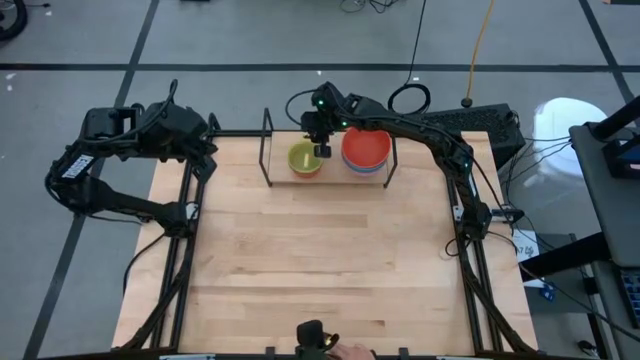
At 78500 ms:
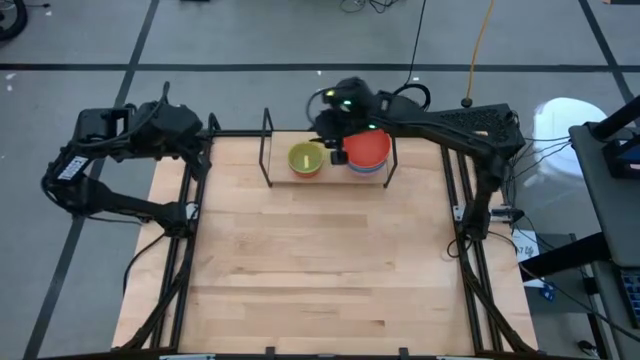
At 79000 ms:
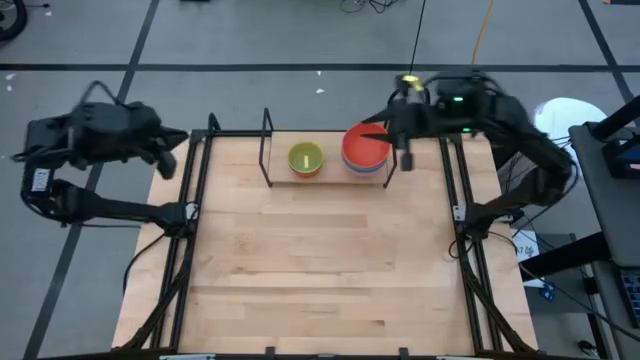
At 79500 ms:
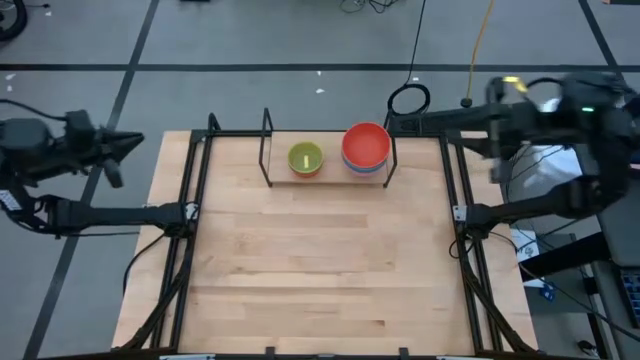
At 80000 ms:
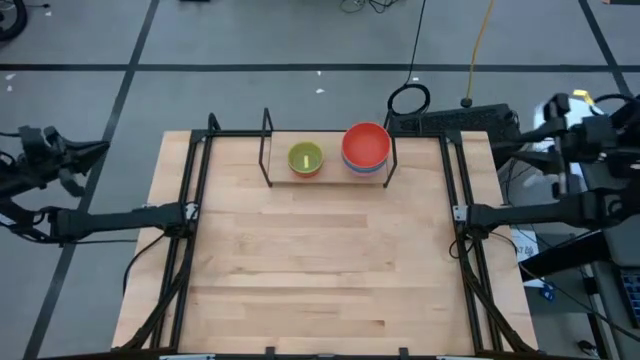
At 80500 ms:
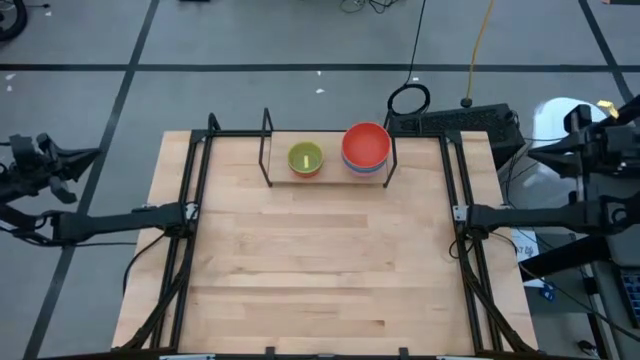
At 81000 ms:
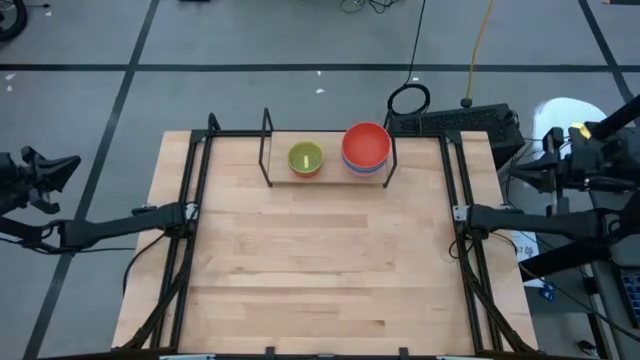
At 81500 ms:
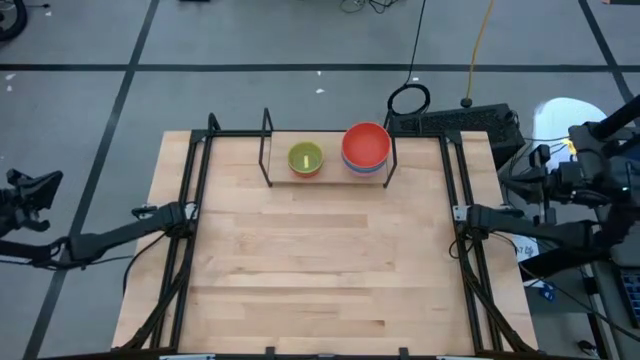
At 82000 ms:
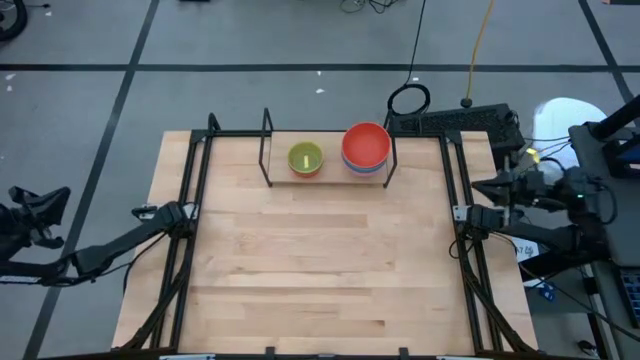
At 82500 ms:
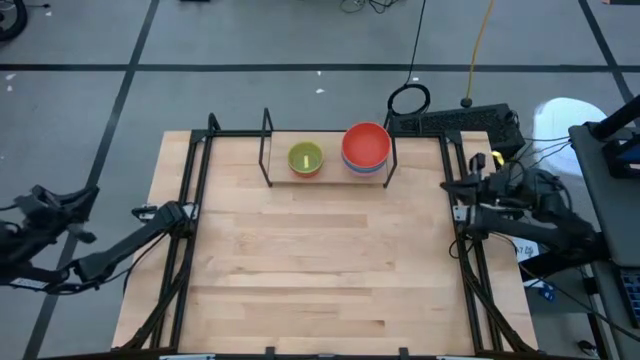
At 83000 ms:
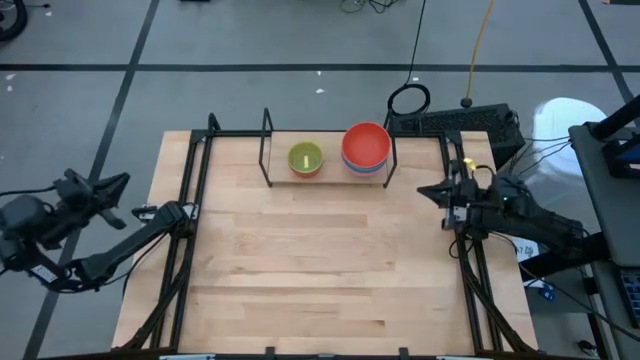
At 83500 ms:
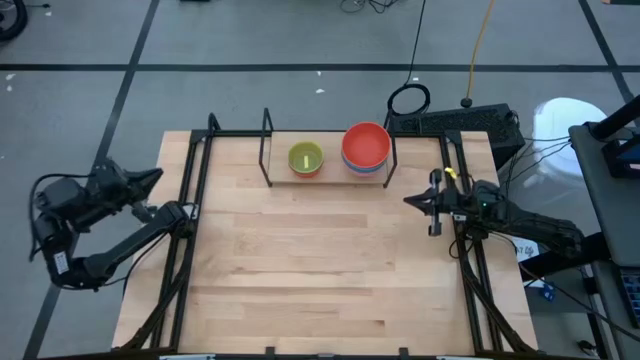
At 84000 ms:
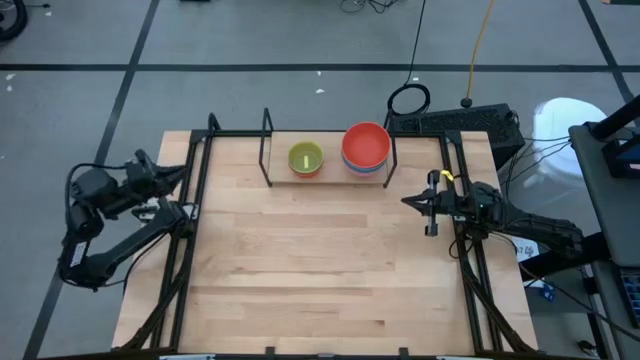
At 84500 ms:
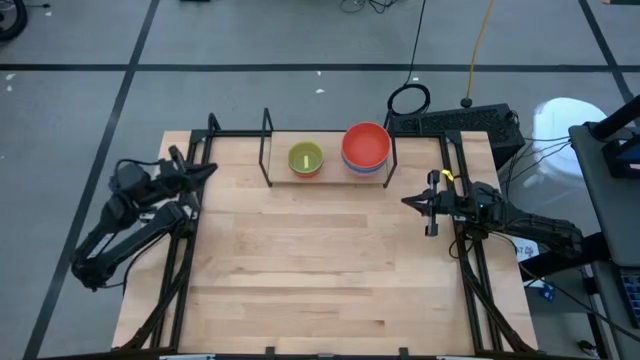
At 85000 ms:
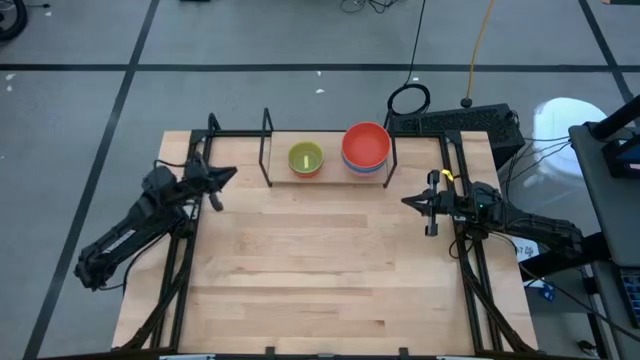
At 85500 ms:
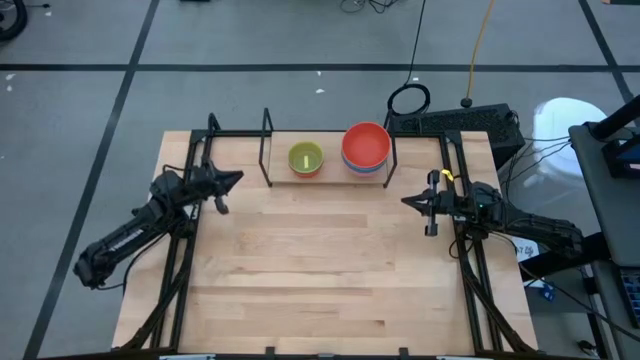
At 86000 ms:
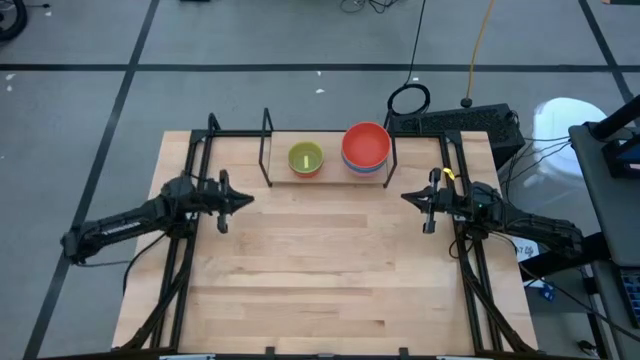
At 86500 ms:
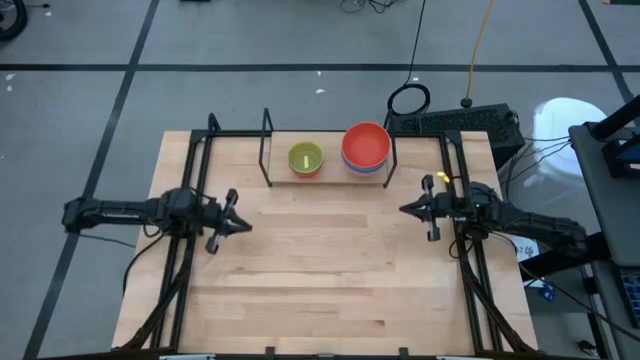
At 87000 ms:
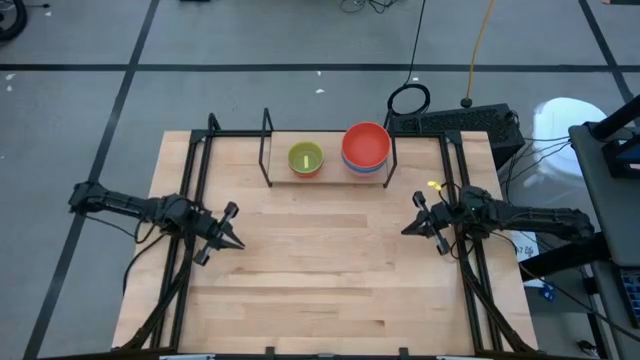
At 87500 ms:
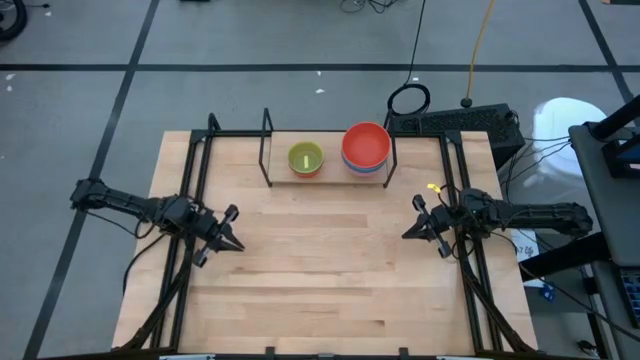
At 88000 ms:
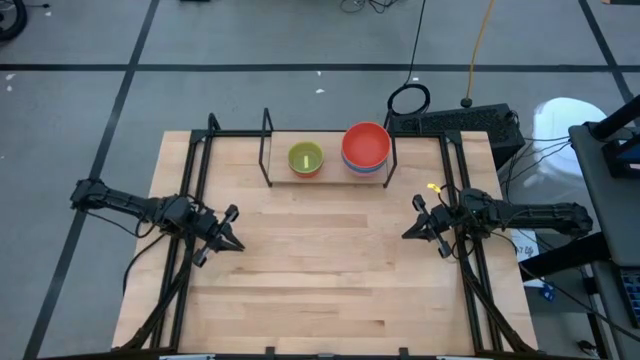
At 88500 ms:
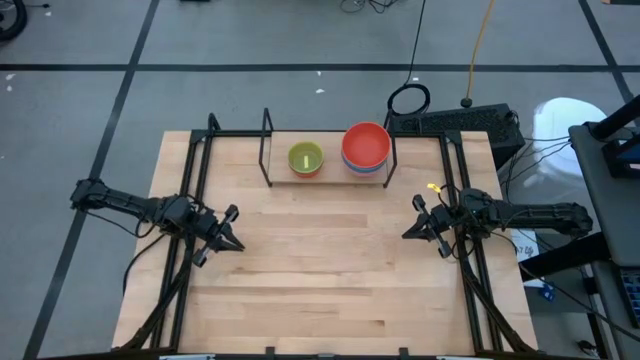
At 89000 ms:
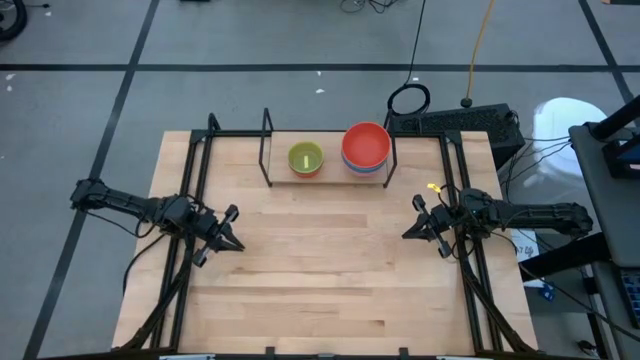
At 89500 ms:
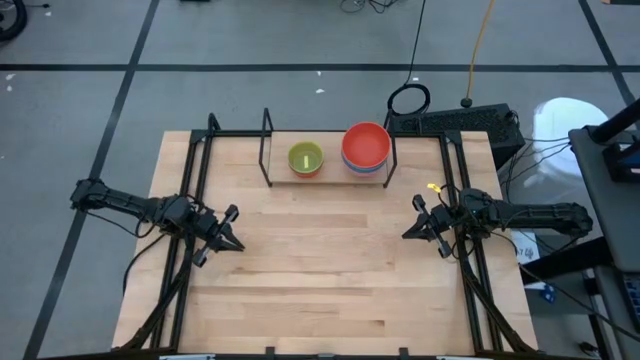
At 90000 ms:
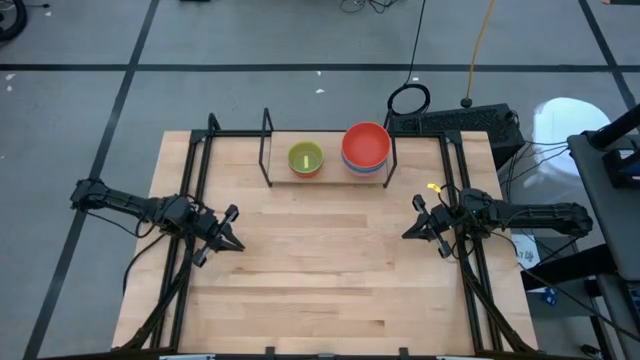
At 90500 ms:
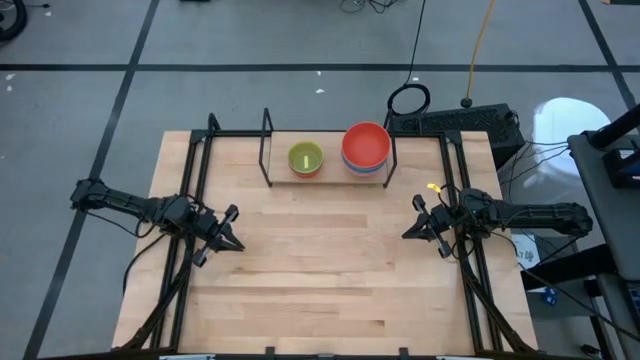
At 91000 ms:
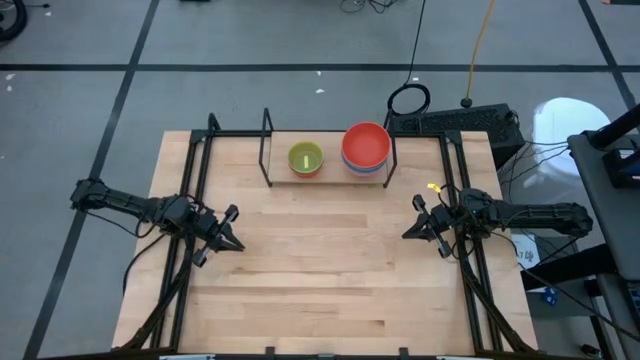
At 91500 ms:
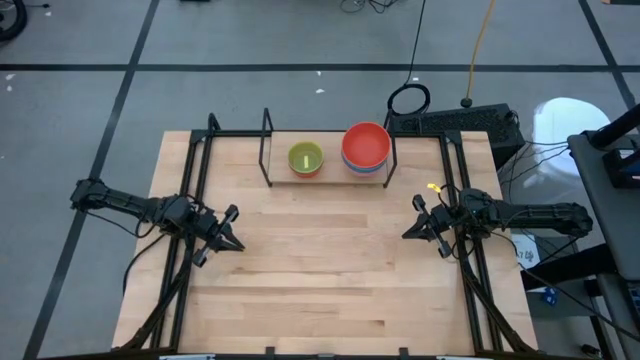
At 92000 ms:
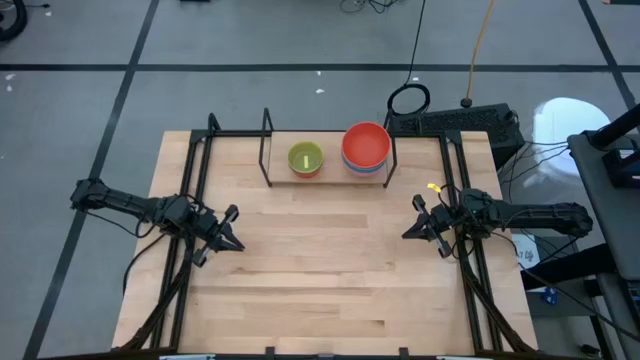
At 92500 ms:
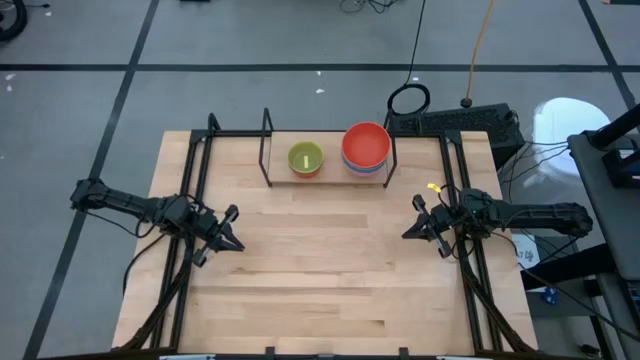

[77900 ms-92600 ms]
Task: Place and stack bowls onto a shelf
Return to Home Position

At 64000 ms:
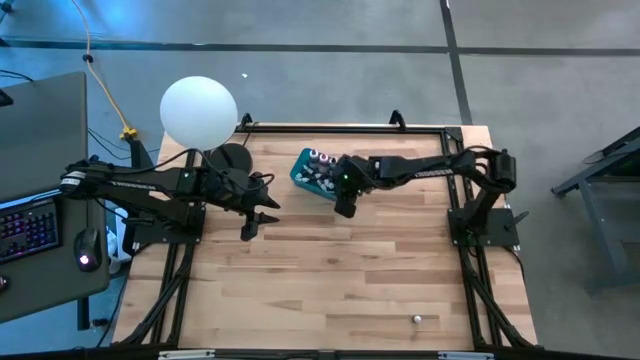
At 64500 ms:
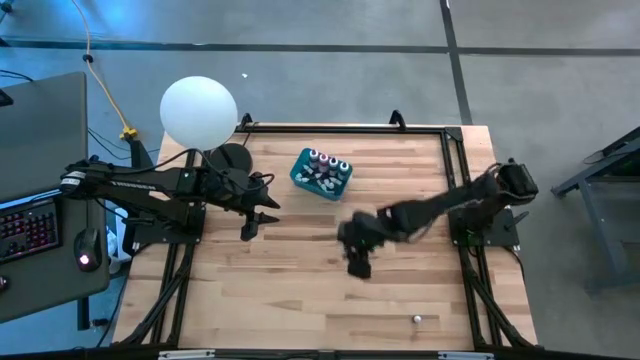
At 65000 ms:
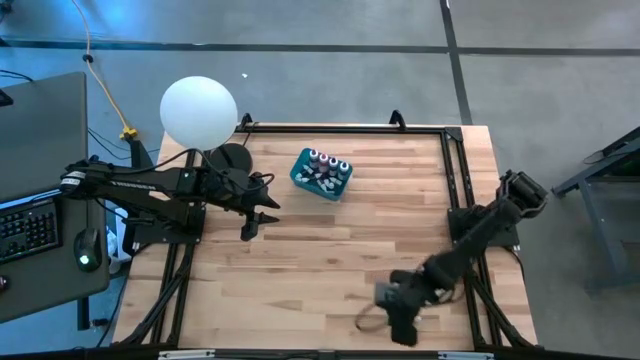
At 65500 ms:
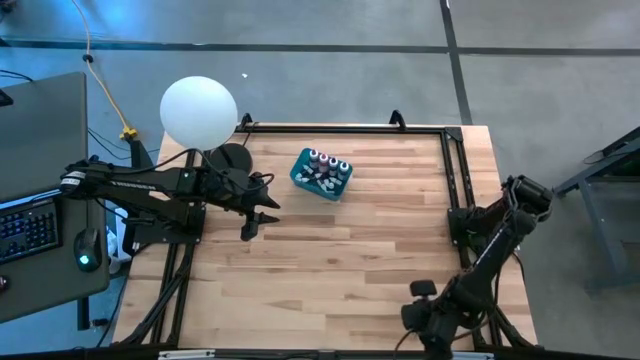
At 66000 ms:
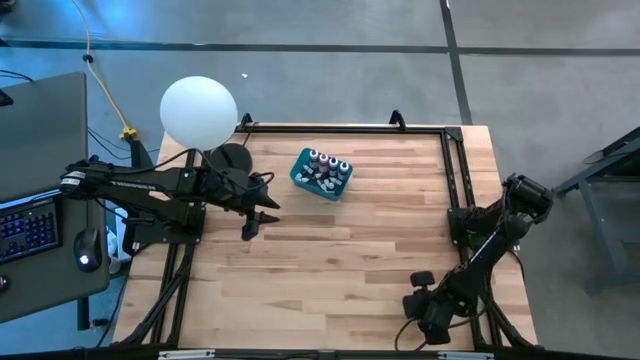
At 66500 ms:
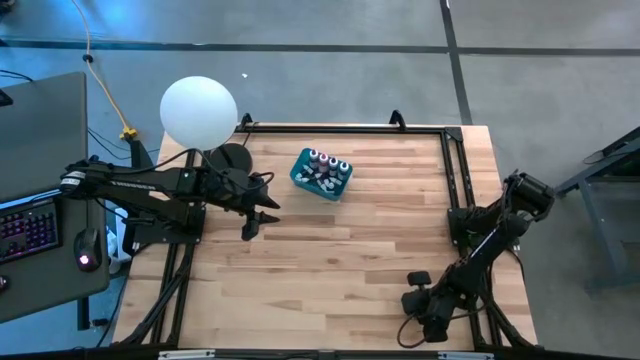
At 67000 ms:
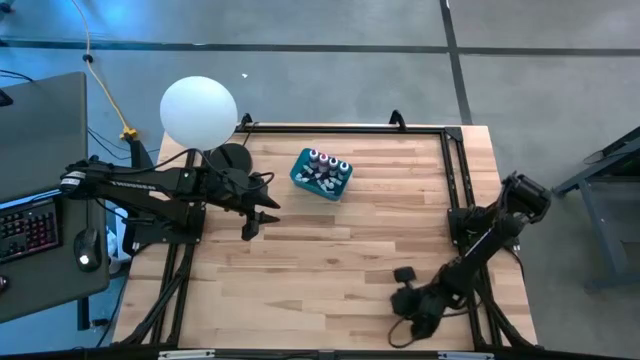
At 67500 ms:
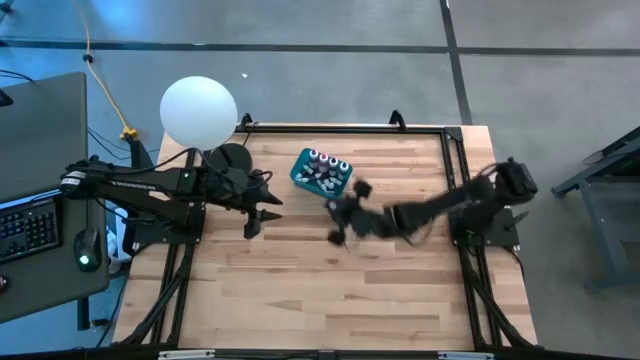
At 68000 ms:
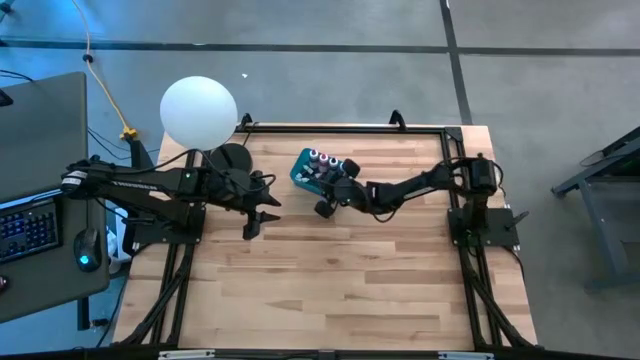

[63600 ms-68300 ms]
Task: Pick & Place food coloring
Put the black food coloring bottle into the blue bin
